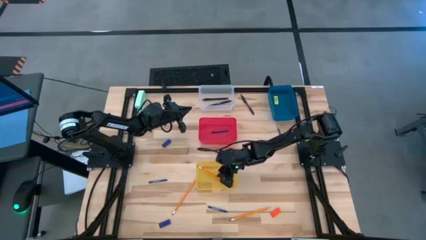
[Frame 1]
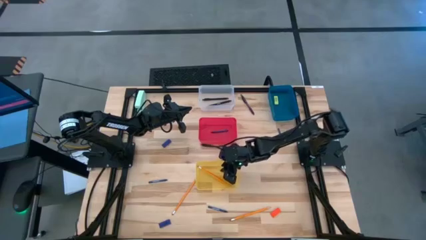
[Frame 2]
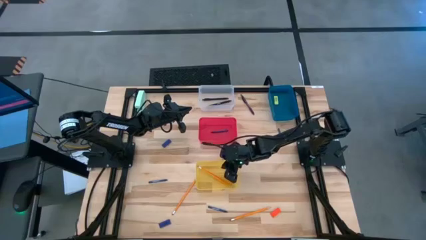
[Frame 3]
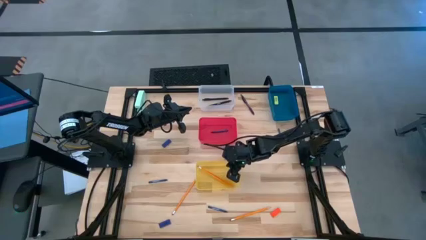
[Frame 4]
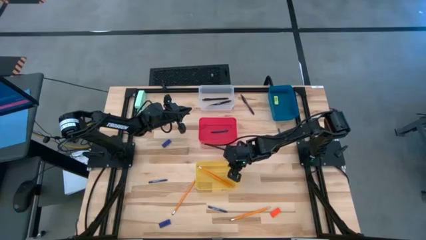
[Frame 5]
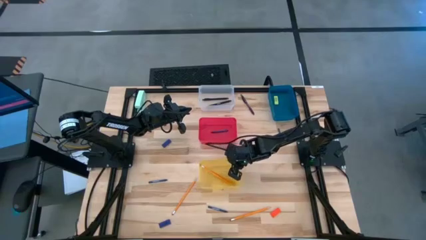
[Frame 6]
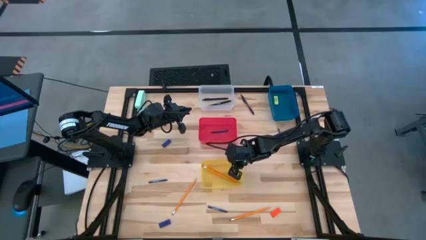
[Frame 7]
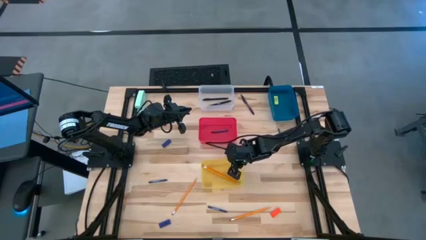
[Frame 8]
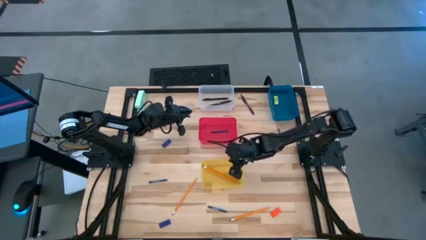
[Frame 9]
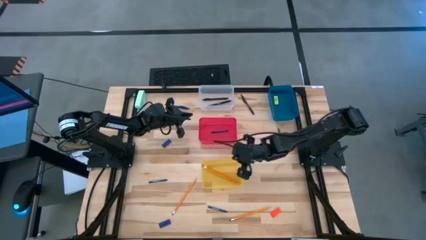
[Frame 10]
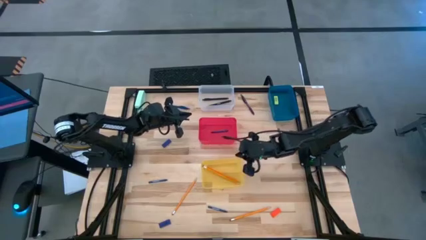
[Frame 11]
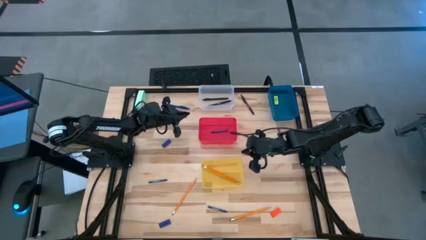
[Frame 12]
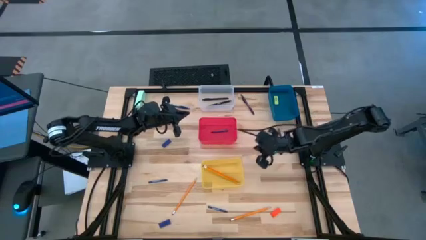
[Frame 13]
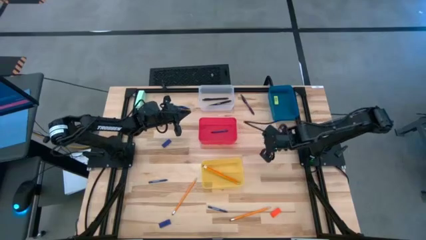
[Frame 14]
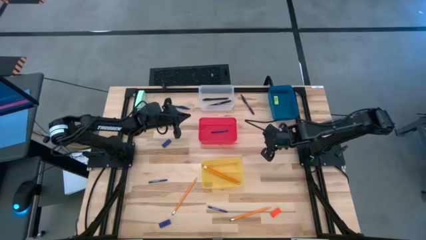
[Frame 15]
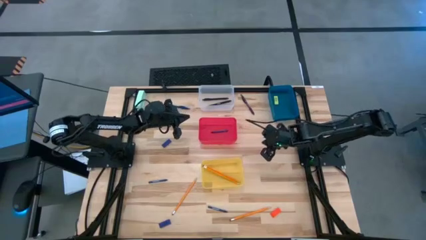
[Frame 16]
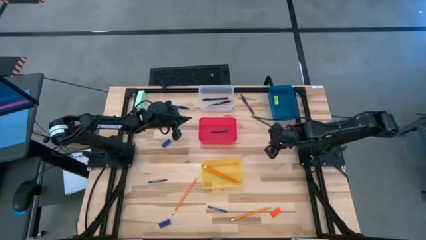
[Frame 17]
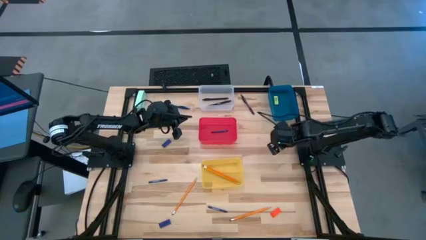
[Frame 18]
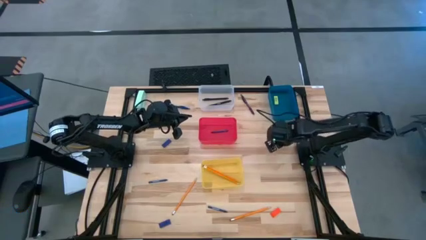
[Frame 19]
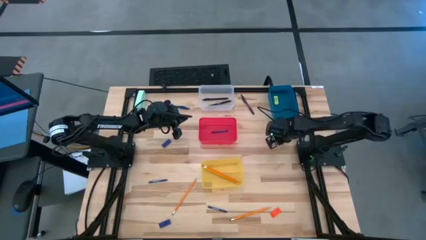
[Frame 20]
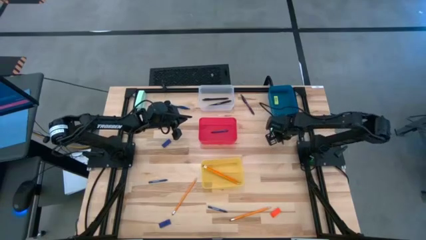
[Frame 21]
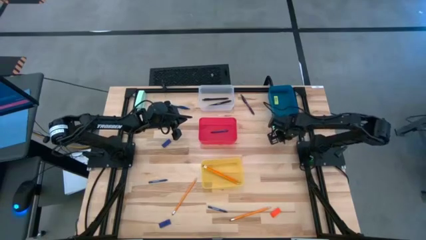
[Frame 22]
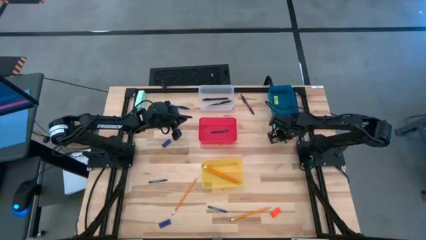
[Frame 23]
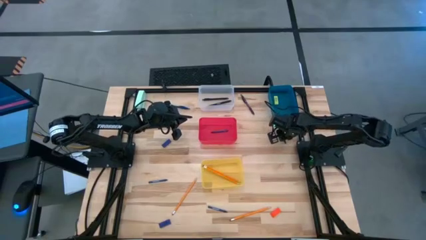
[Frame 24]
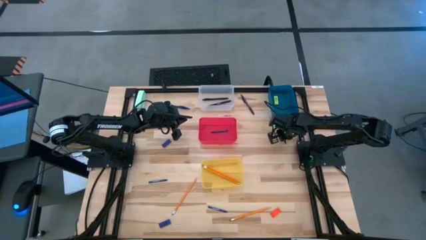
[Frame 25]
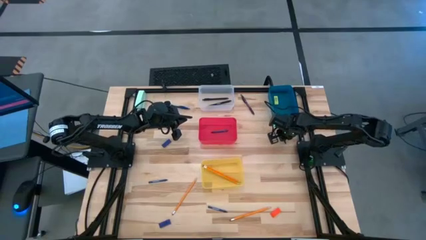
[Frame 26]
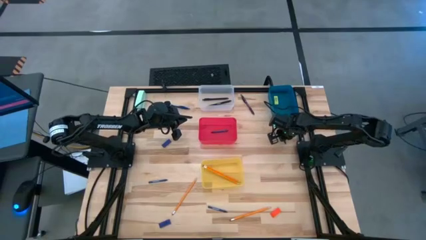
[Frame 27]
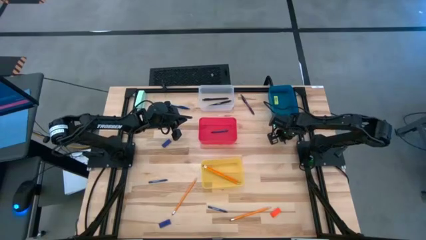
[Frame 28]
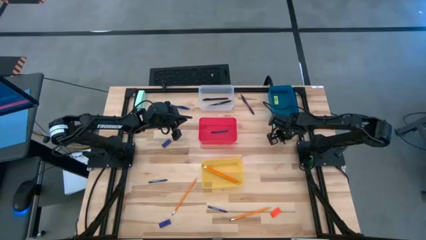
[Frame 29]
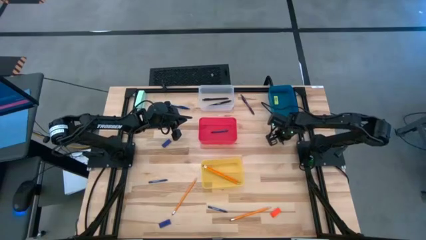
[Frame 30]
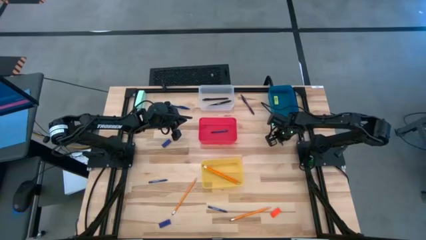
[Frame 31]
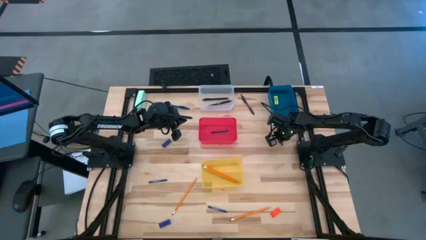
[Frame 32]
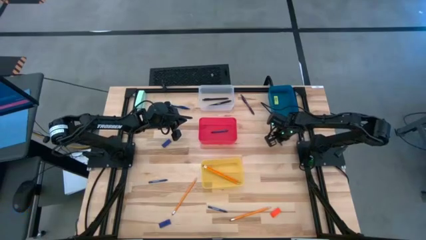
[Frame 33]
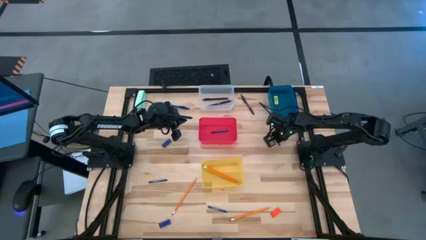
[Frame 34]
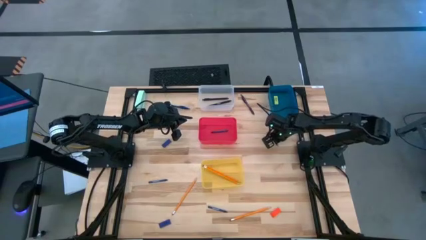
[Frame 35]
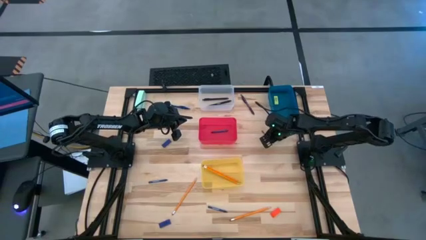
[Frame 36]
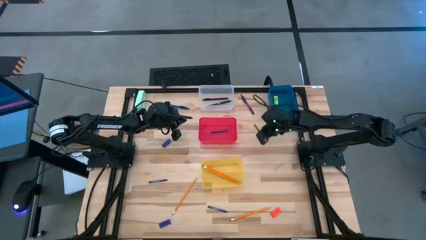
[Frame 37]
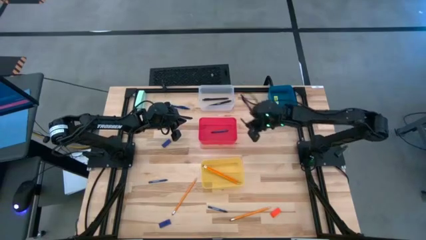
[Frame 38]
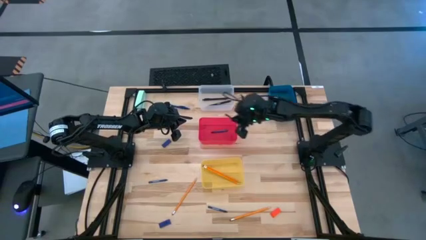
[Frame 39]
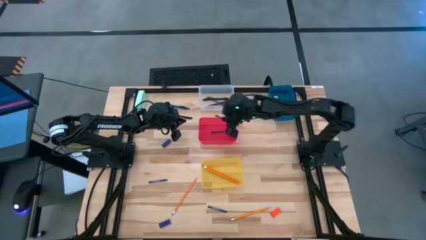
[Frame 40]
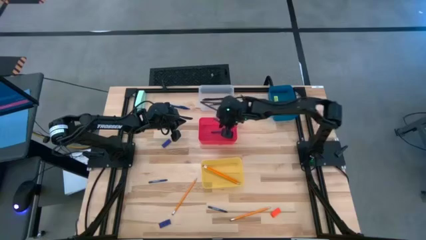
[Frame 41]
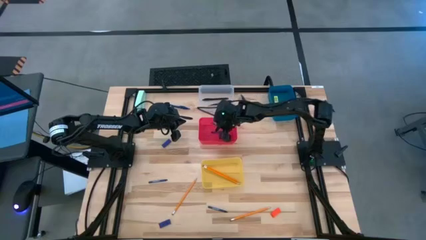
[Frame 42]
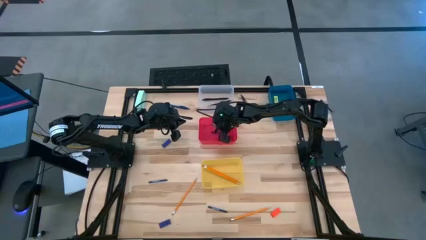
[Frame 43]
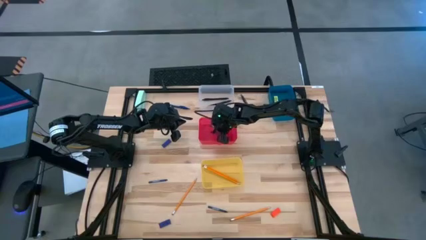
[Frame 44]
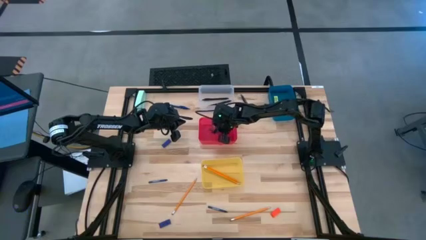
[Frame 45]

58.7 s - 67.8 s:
Task: Sort crayons/erasers/pens/pencils in bins
Put the top right blue crayon into the red bin

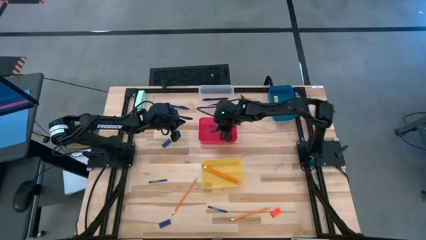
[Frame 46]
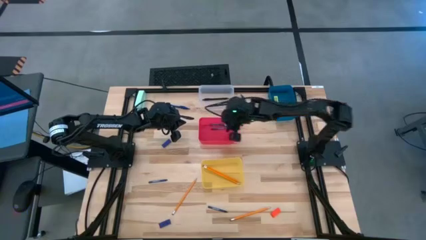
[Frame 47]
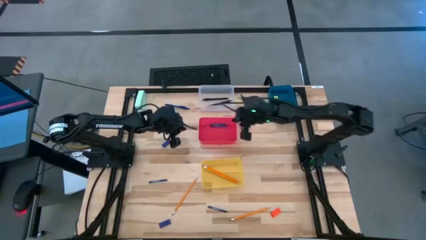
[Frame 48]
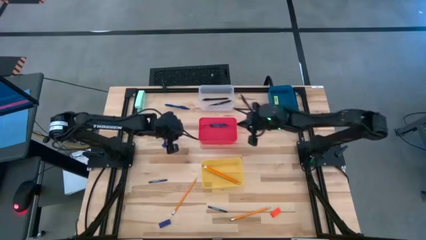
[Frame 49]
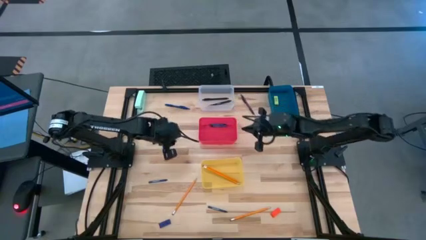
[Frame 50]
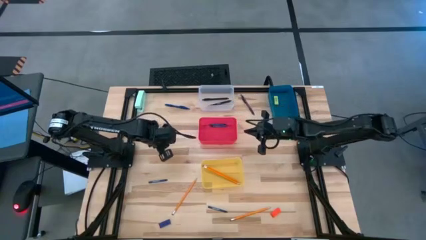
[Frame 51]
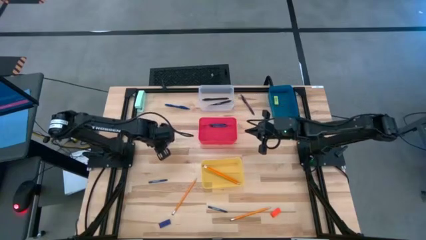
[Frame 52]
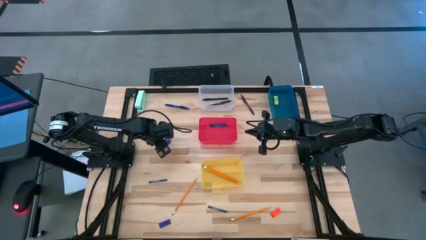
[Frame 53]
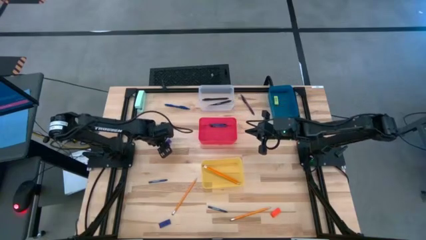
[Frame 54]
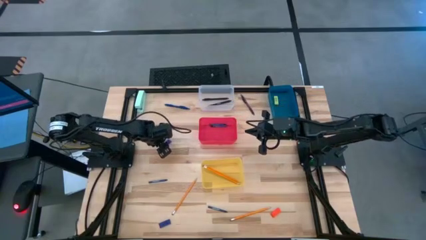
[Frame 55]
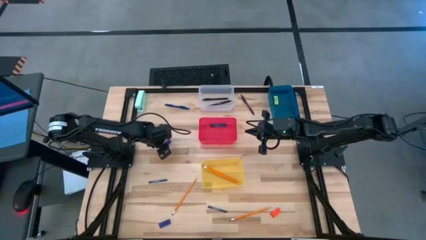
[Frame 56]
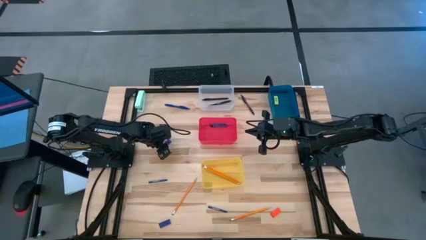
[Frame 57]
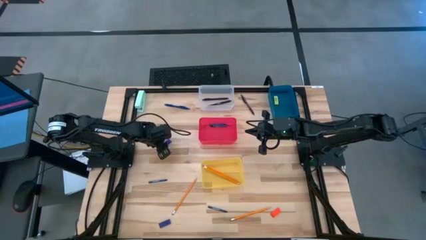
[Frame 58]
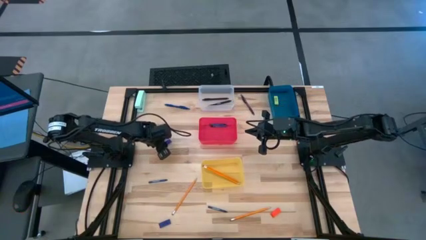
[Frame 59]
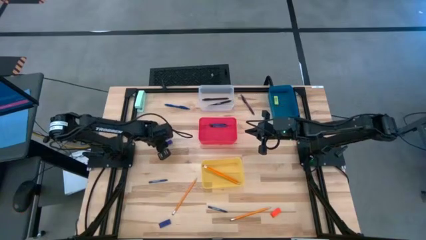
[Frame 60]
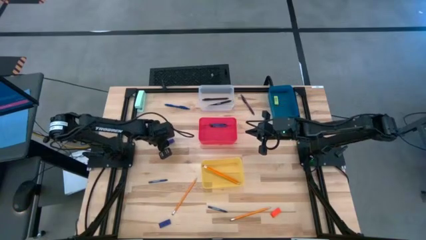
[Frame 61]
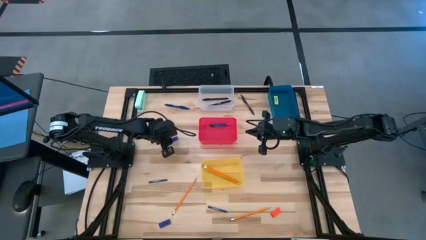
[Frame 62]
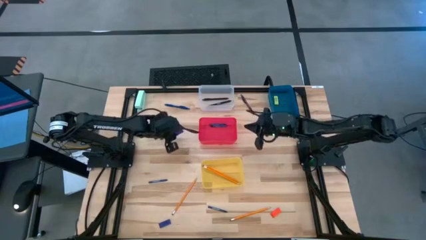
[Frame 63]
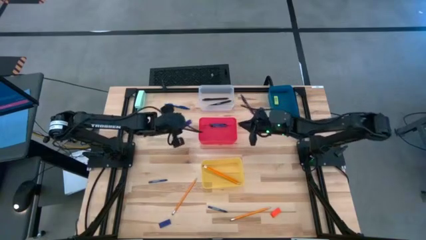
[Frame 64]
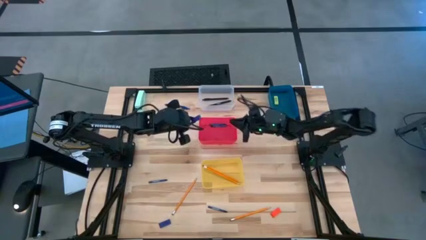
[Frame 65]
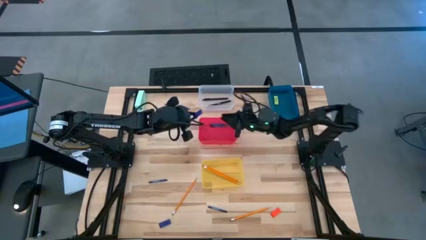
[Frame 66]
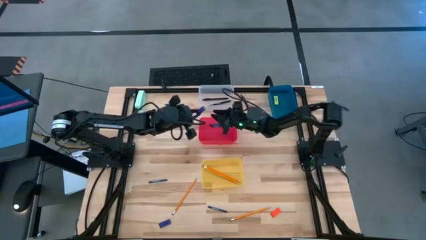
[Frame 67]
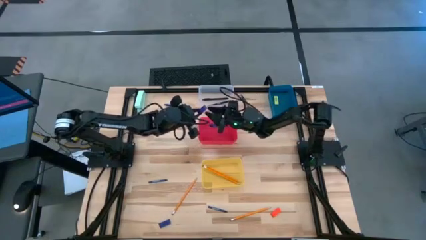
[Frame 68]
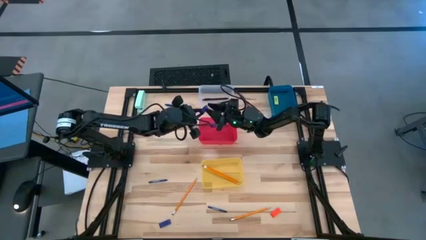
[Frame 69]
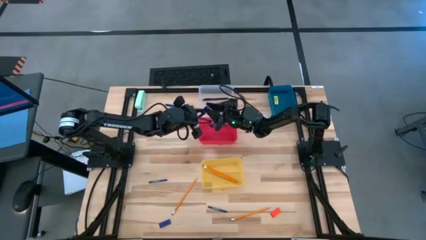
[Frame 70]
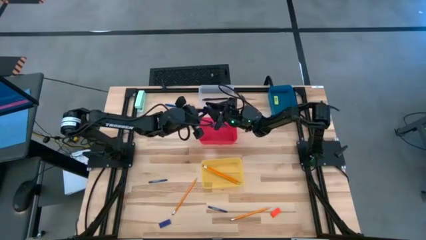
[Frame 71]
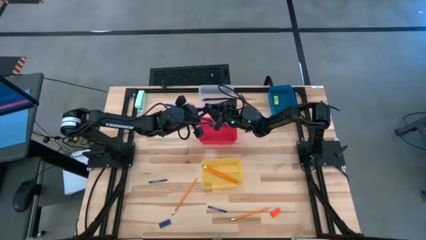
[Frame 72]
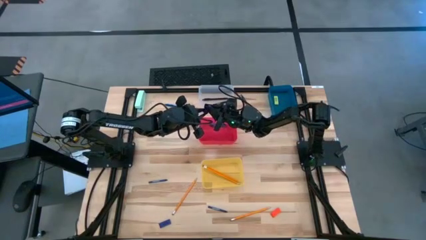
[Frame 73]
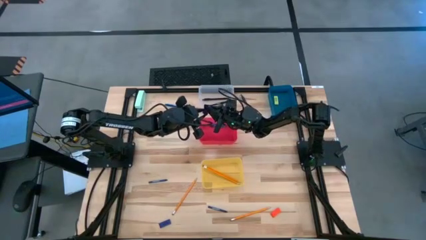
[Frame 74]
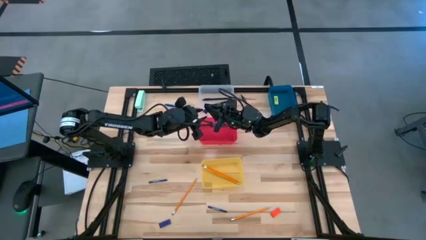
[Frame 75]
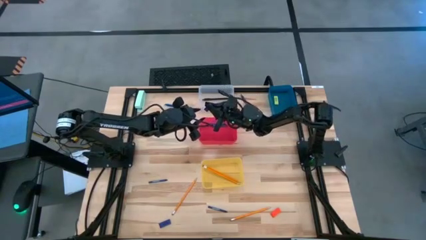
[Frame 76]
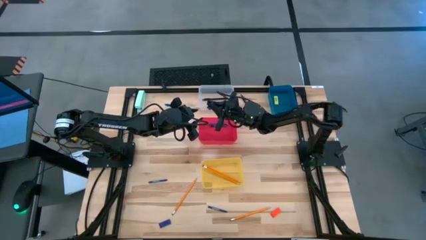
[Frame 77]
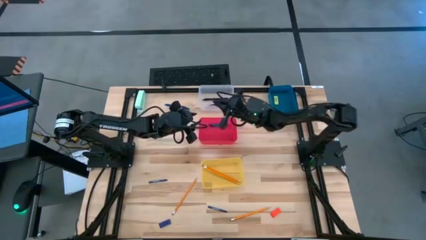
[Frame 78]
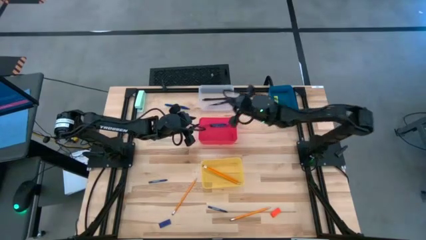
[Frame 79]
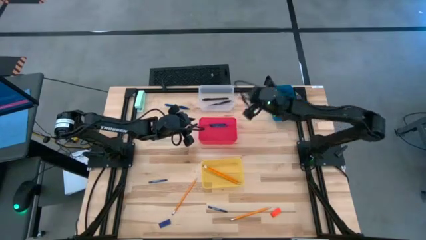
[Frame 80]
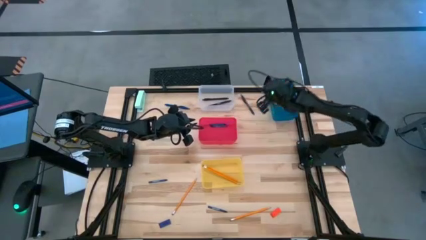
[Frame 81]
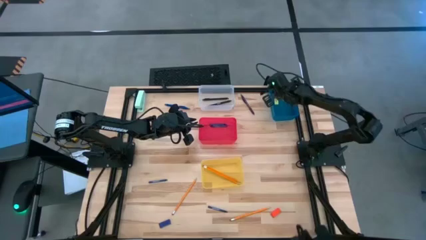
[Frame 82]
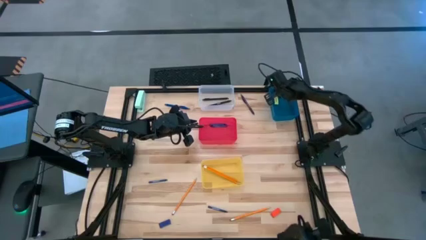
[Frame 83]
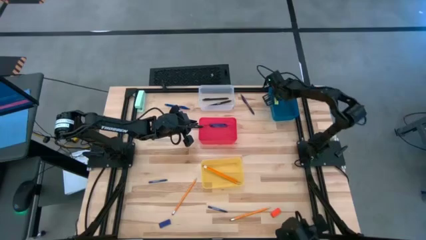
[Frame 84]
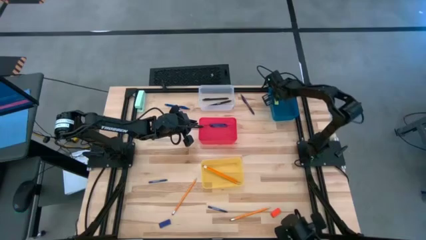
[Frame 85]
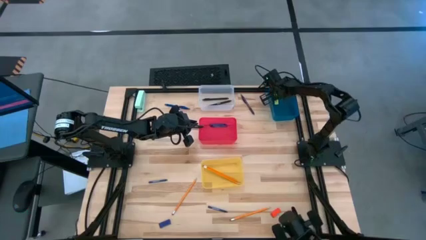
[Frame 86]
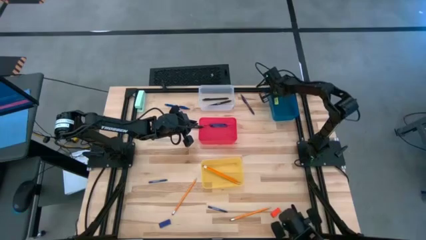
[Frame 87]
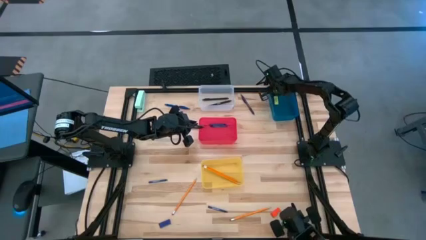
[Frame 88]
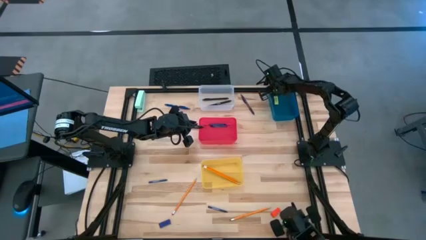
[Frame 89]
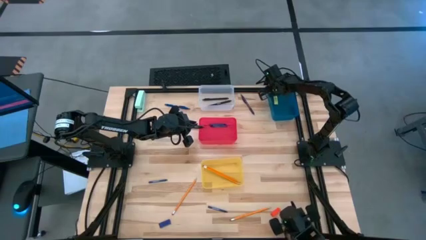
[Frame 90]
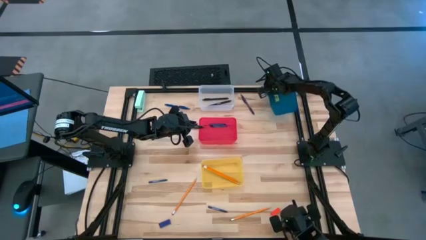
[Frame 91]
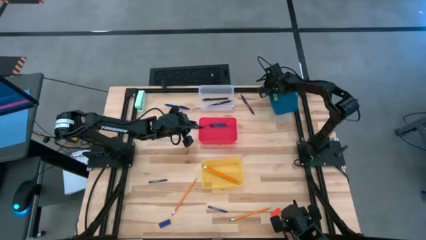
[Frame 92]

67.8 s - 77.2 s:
Put the top violet eraser into the blue bin
